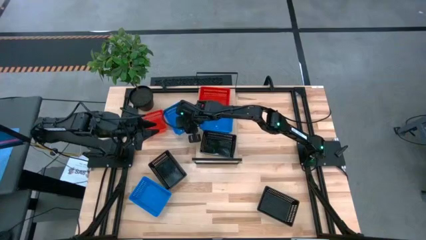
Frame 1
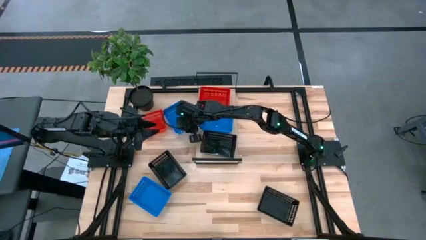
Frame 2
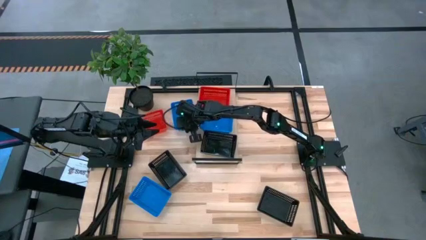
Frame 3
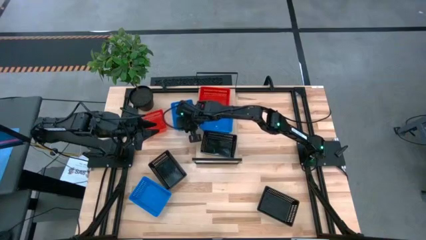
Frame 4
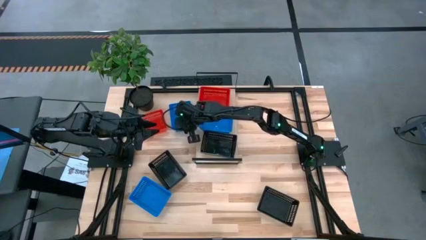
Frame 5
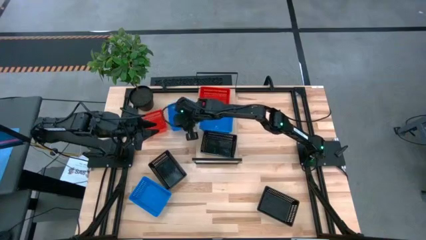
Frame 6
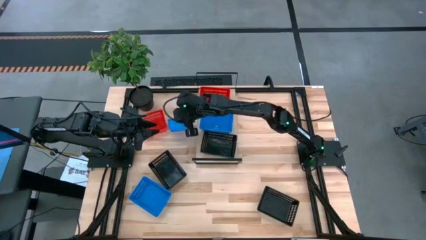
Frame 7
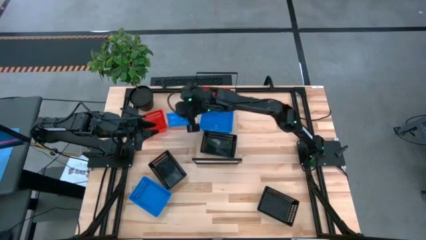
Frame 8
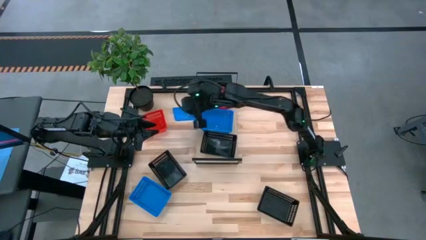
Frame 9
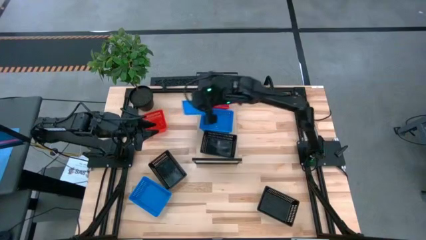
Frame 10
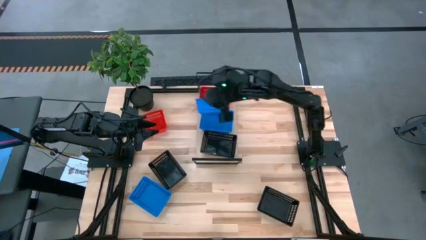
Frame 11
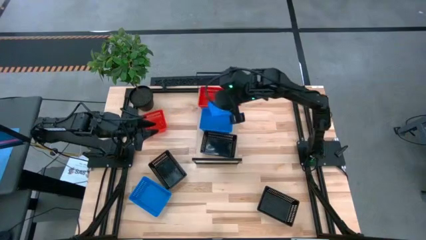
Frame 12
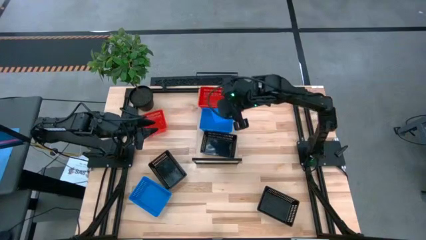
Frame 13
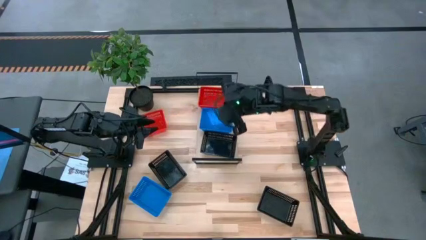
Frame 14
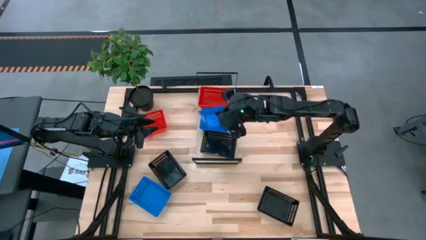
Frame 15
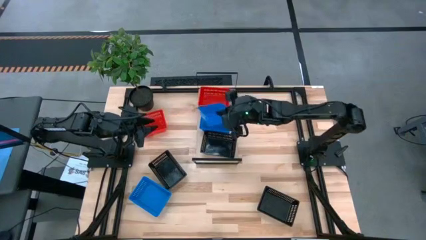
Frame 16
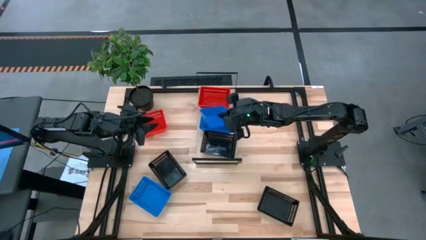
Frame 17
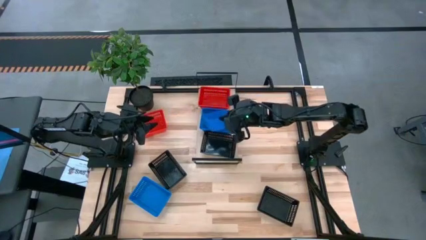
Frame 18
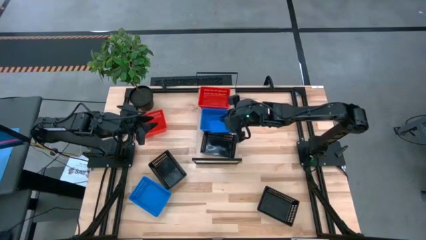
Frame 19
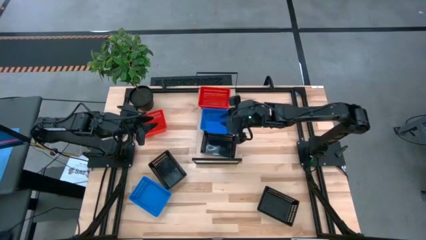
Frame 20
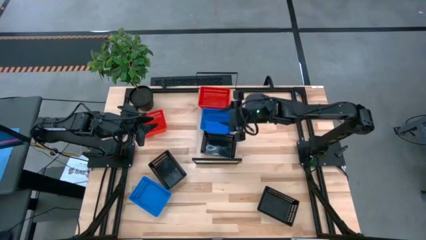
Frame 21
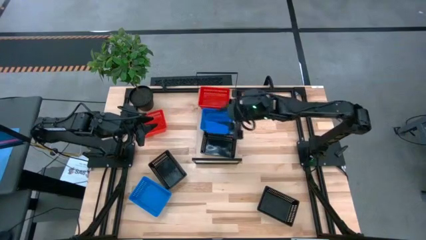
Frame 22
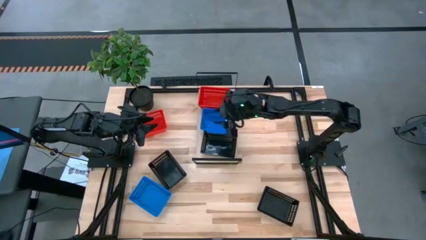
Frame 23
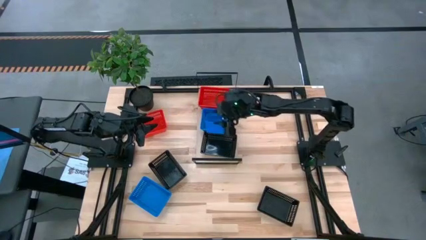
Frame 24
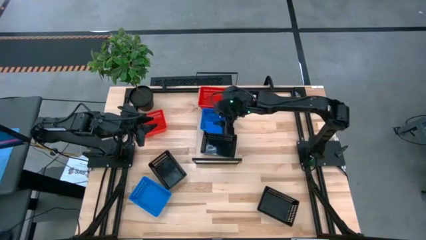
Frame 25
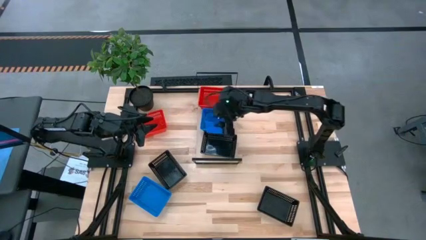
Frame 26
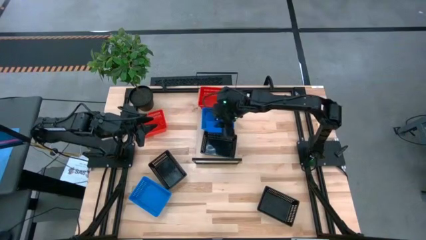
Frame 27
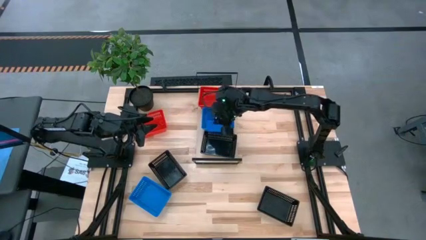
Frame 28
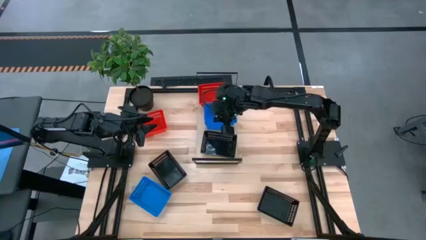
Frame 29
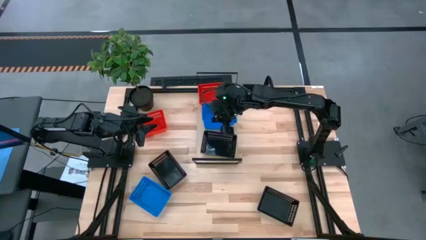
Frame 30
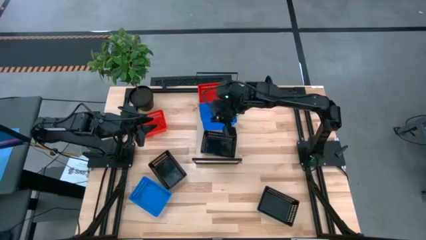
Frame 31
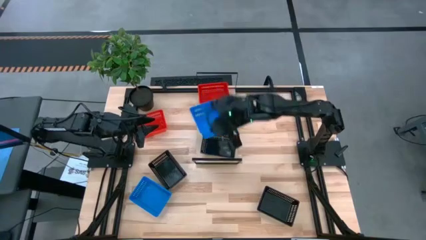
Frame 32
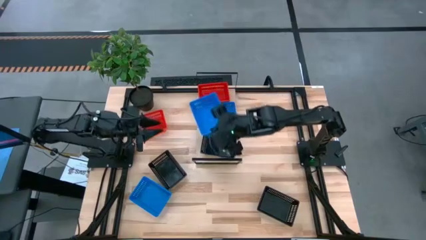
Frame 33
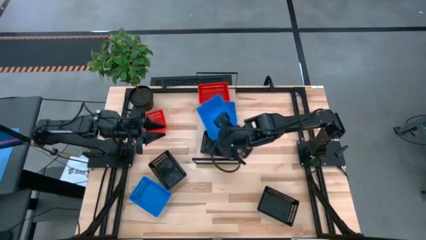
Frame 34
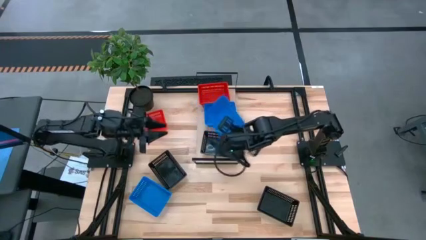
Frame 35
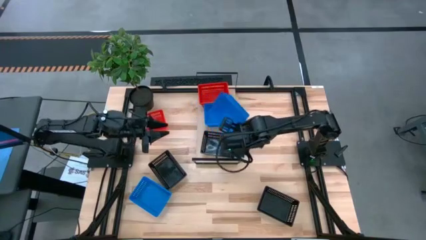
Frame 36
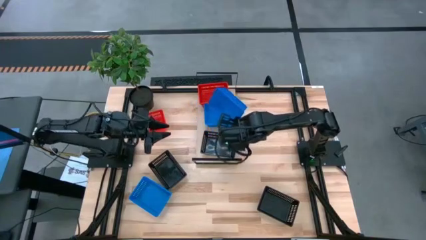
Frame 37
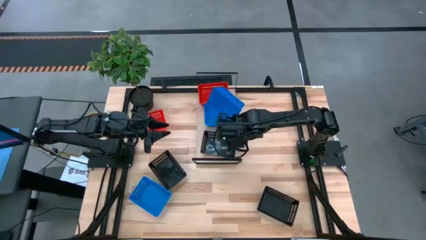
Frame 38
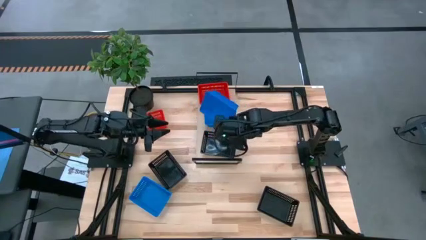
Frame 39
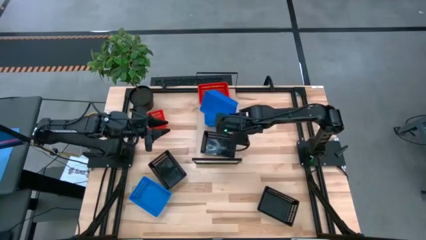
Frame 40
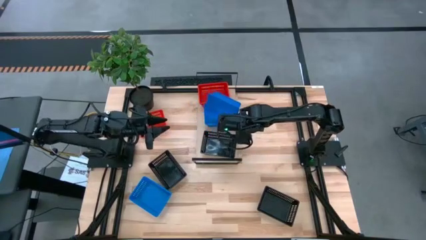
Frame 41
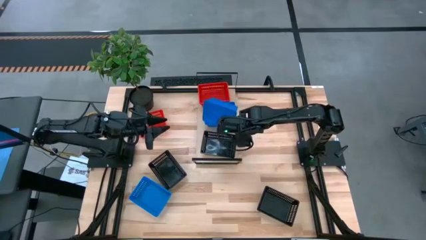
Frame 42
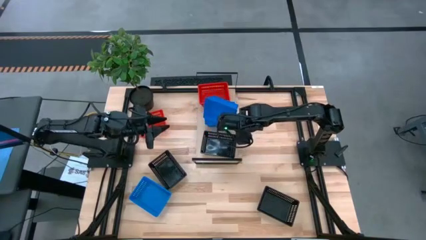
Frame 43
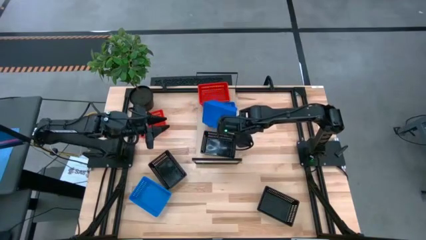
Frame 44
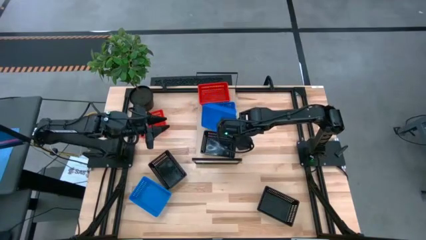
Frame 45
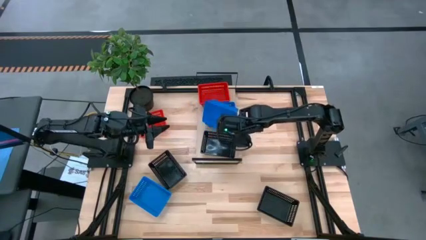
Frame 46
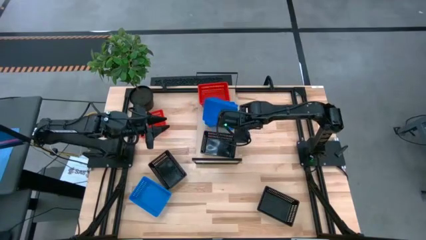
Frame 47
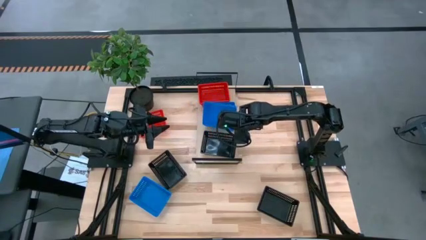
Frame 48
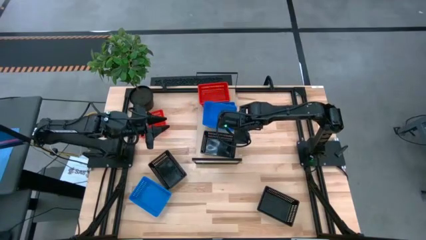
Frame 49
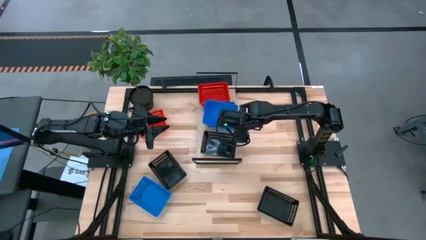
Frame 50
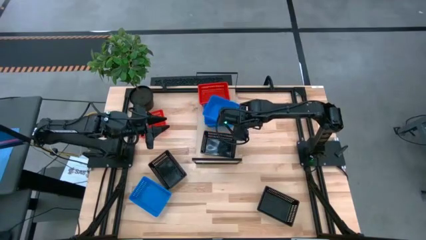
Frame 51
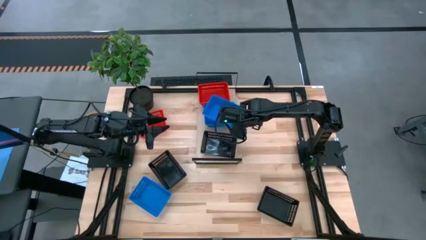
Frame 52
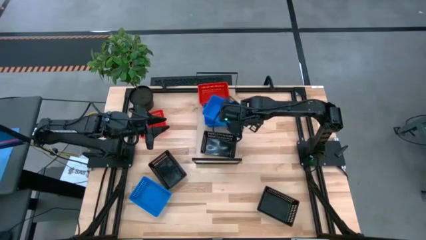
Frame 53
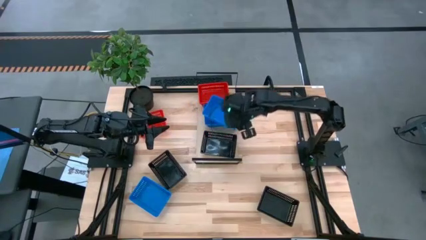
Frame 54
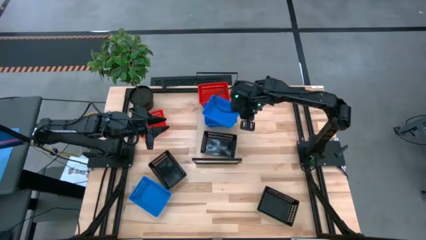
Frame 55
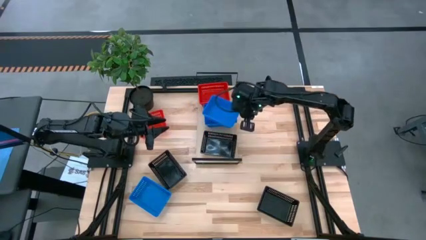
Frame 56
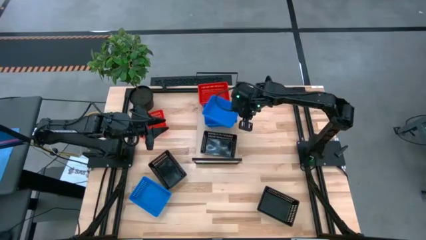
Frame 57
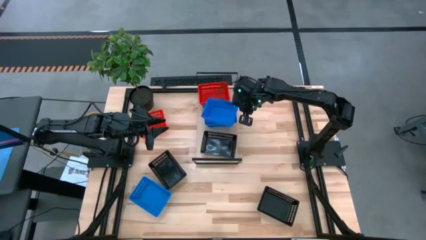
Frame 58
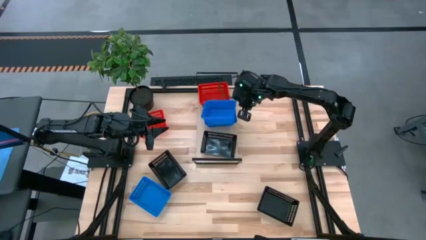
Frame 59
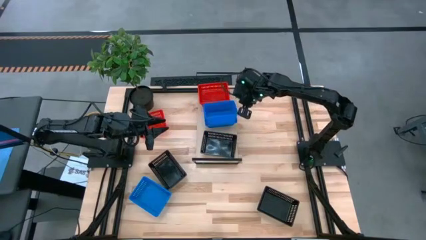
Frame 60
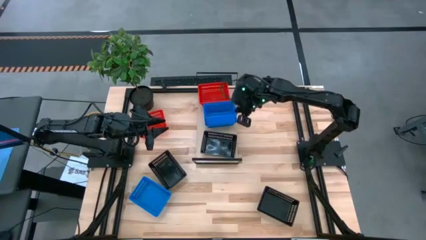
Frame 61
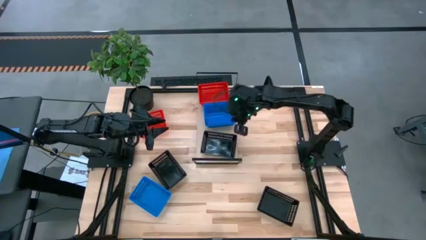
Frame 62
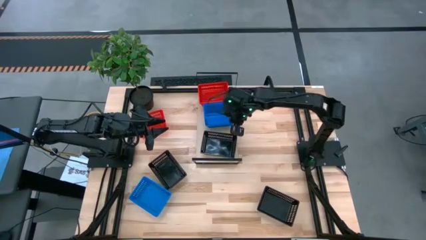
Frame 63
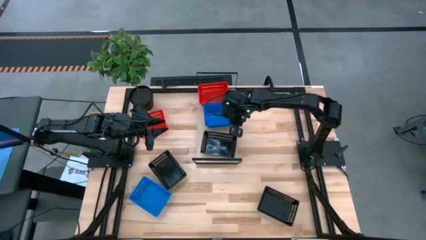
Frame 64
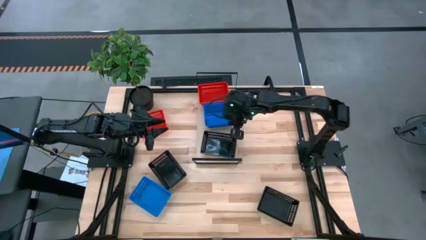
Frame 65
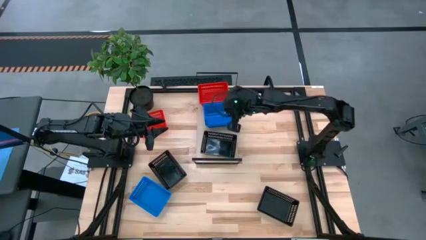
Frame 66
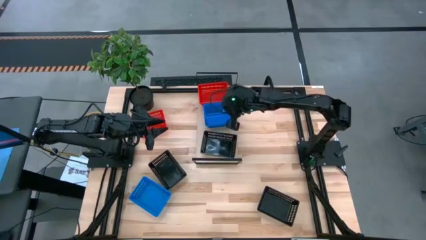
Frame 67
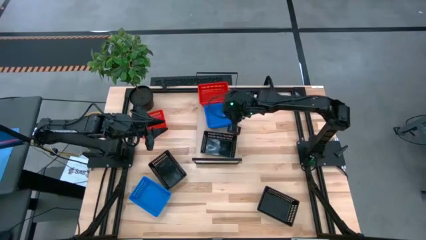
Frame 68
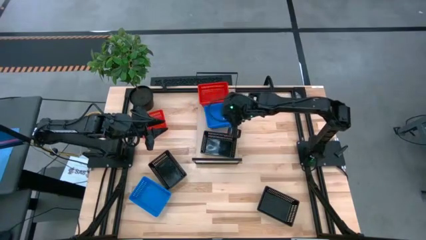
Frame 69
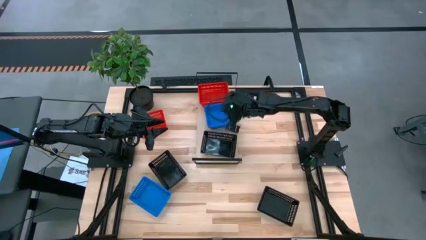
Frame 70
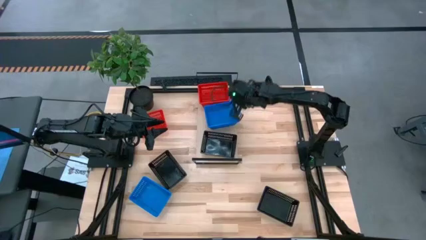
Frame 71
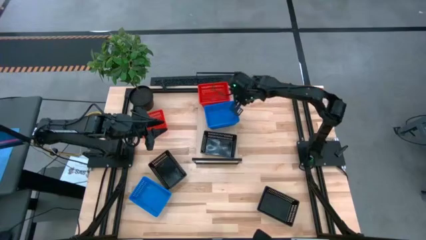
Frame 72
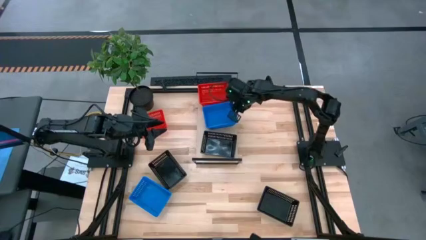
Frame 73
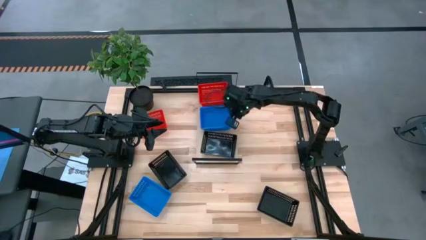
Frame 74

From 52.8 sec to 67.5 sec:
Task: Stack baskets on shelf by color
Stack the top blue bin on the blue bin on the shelf
